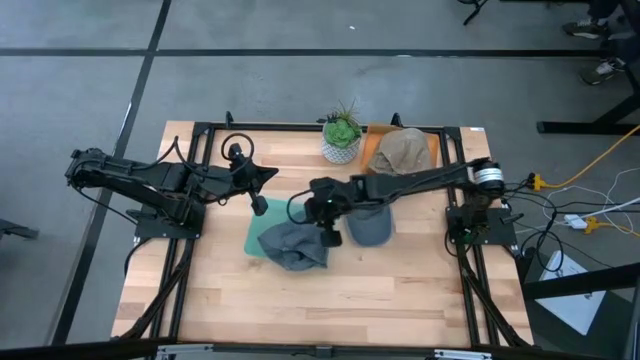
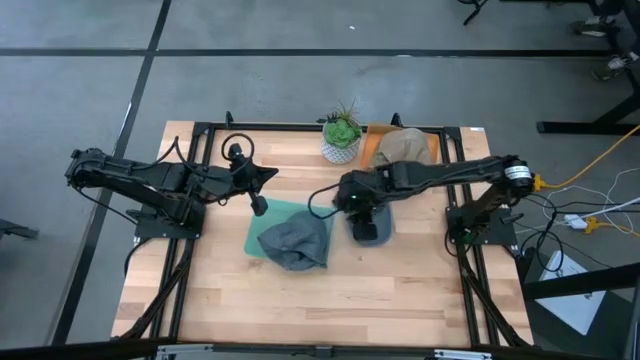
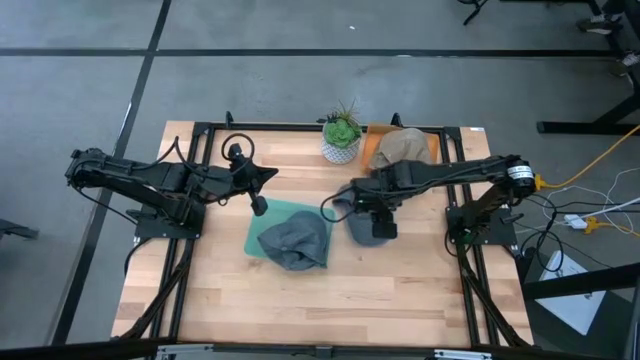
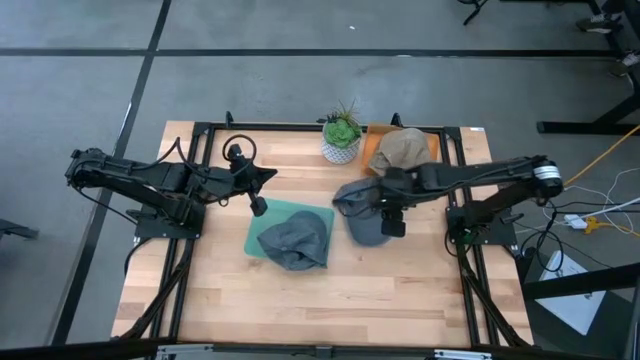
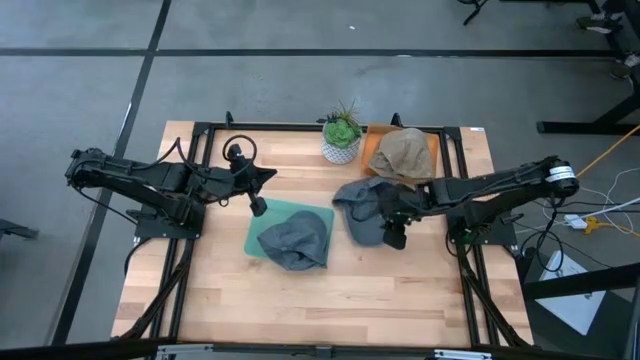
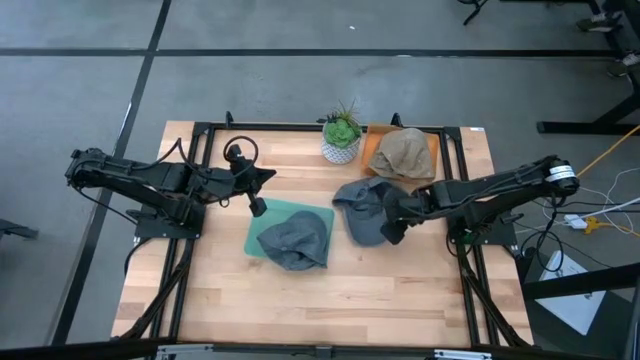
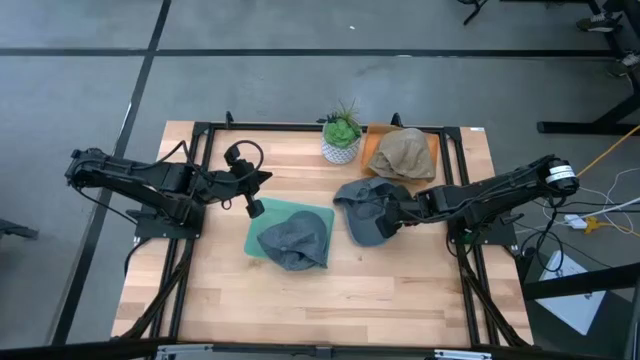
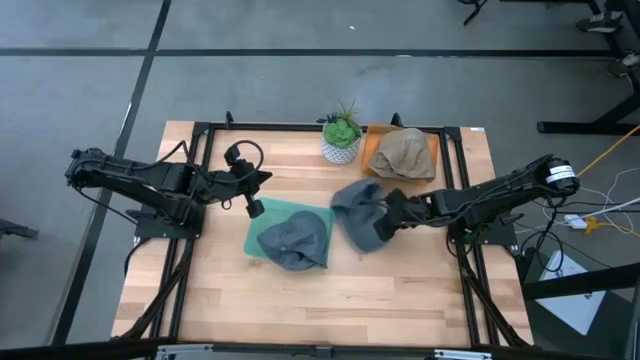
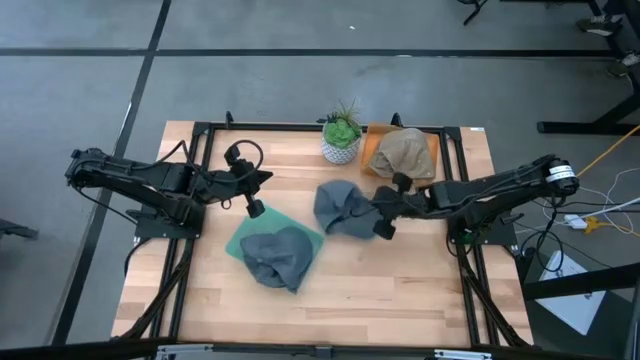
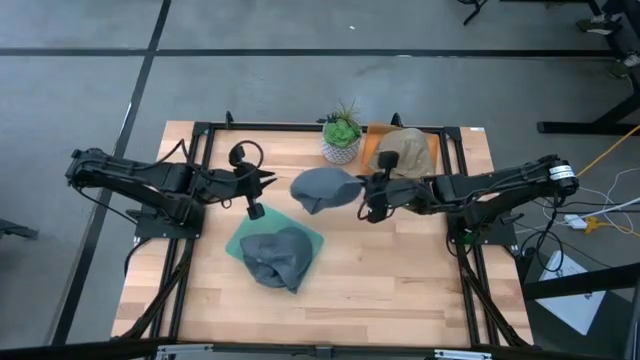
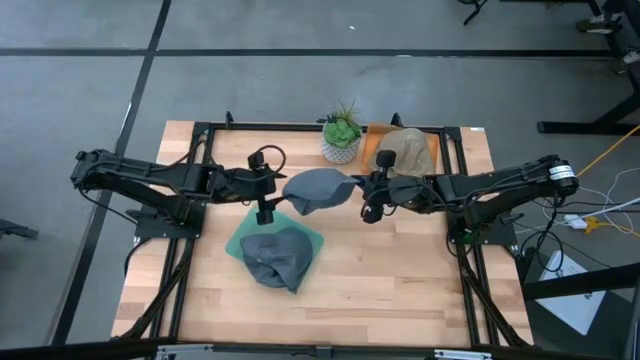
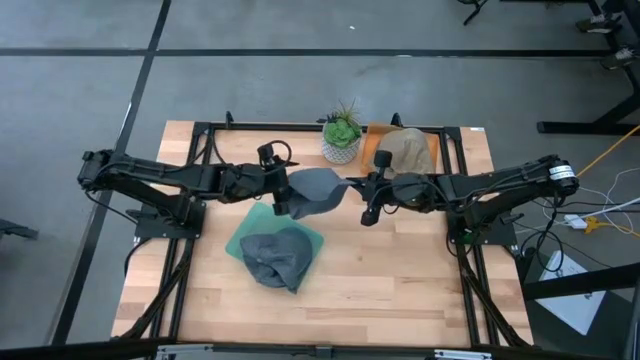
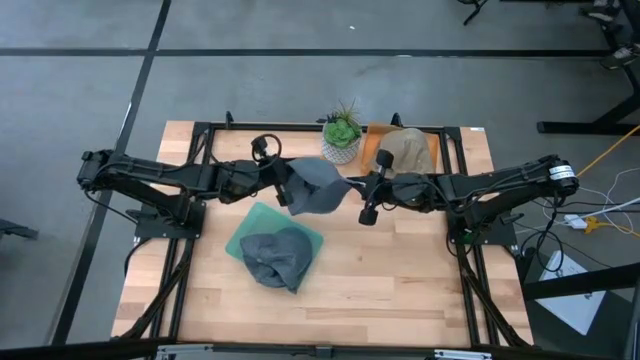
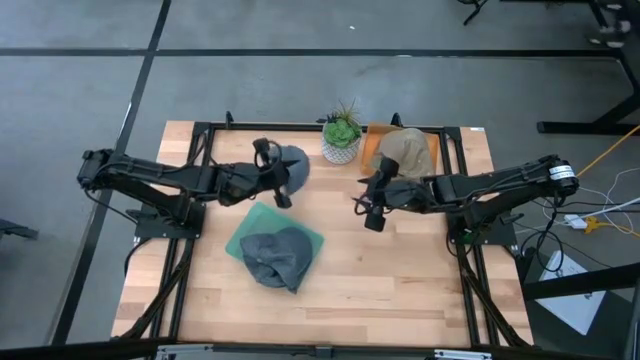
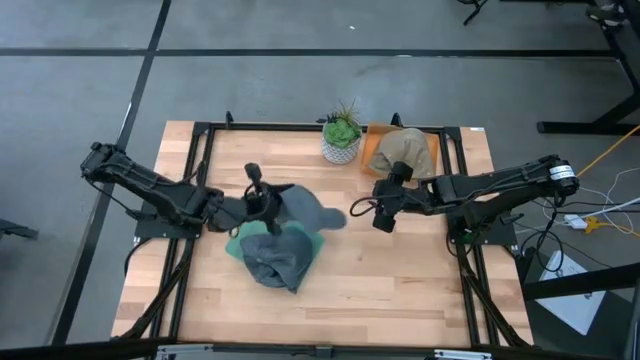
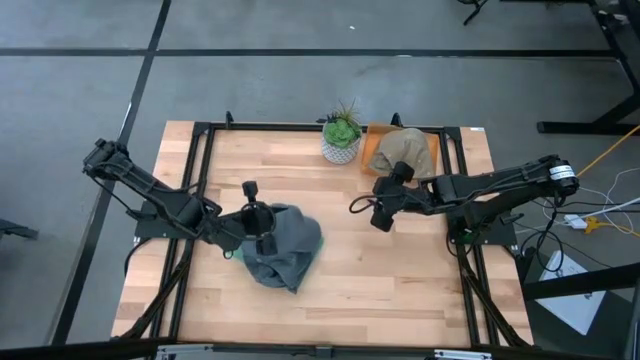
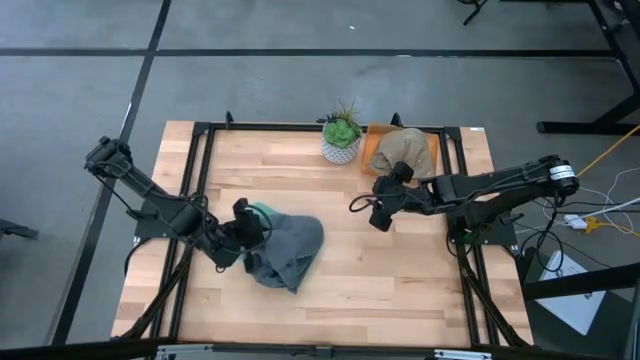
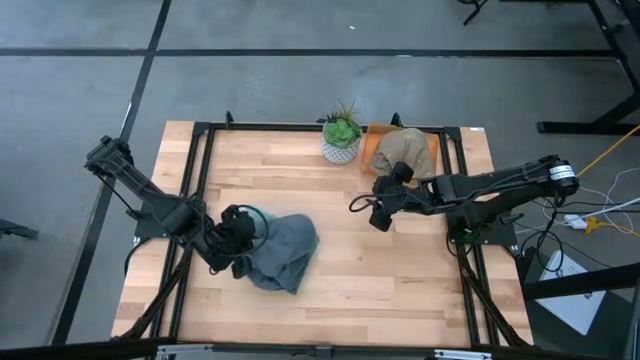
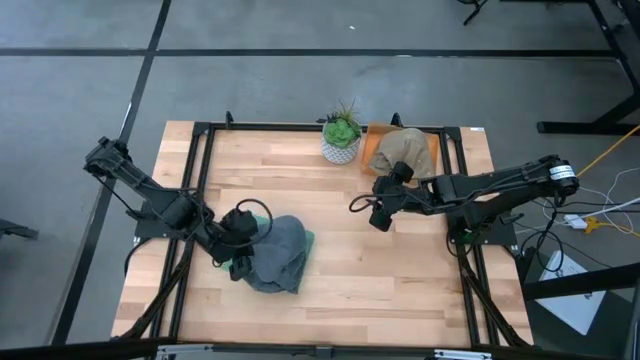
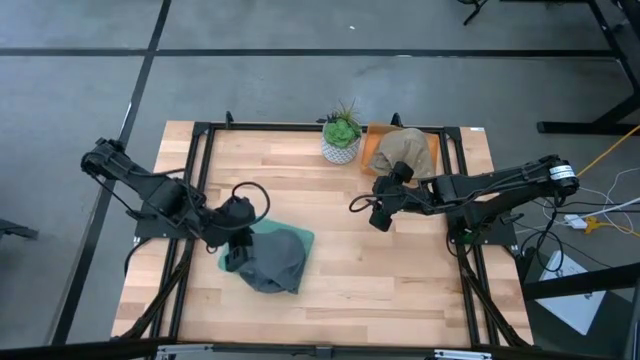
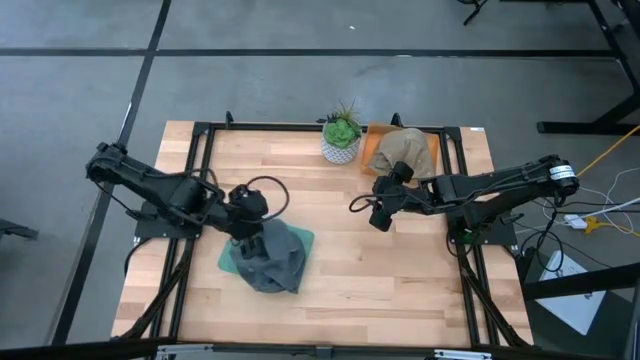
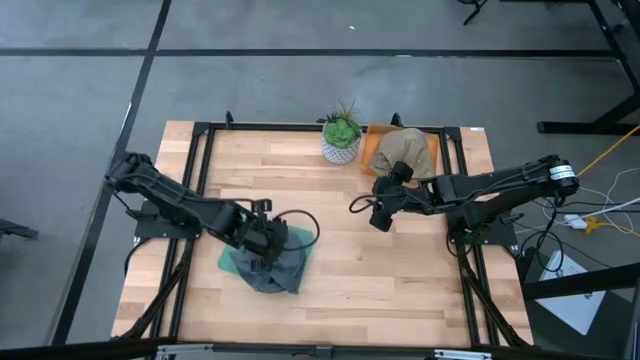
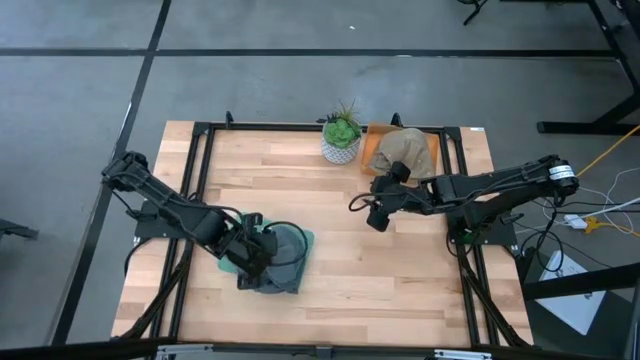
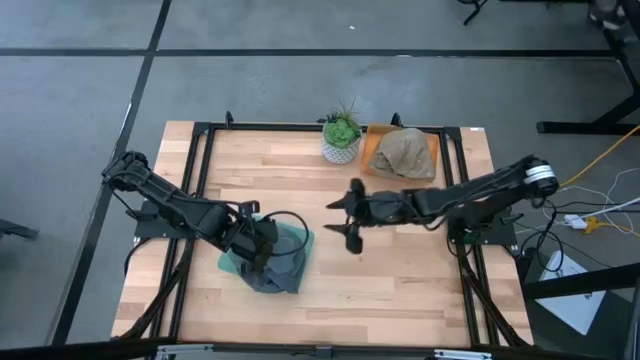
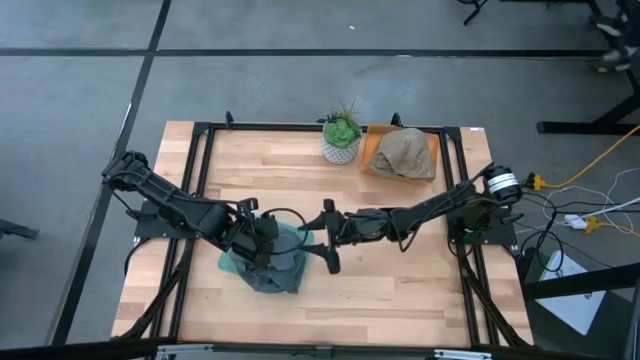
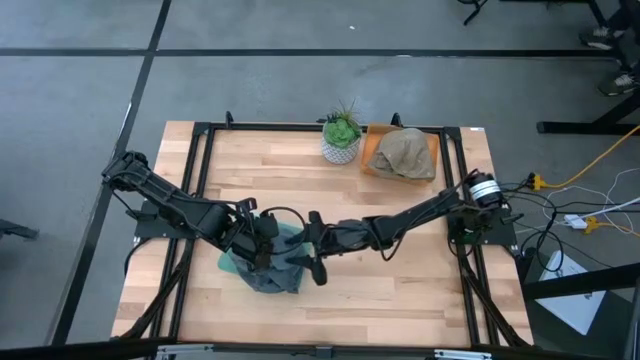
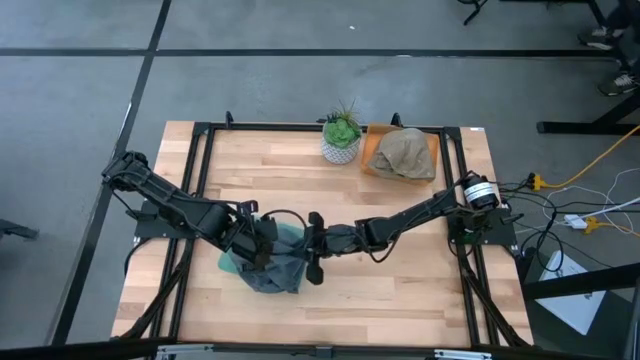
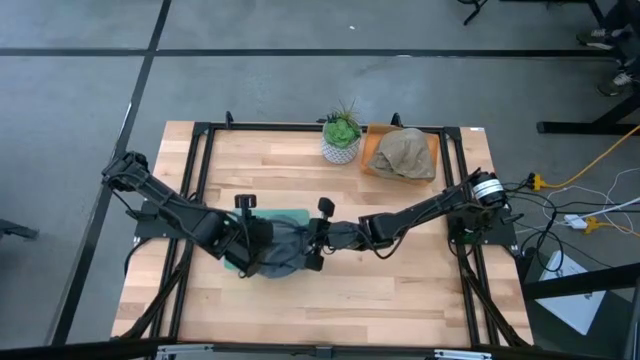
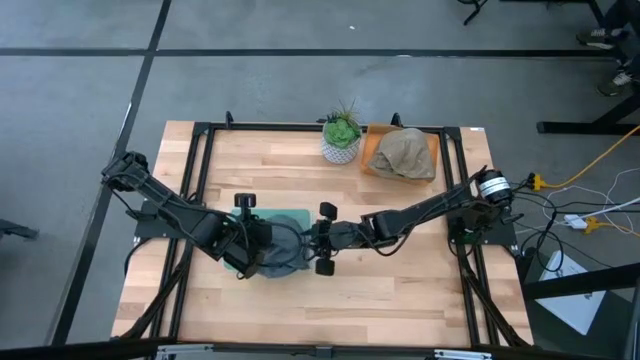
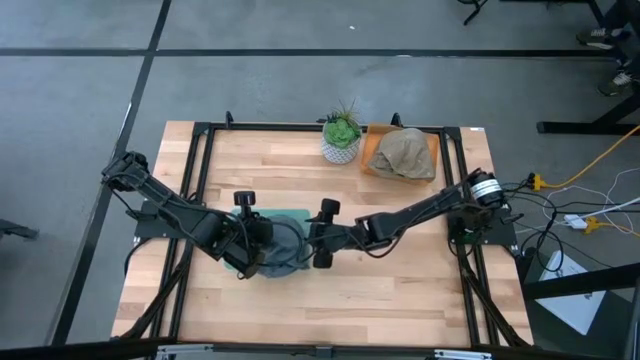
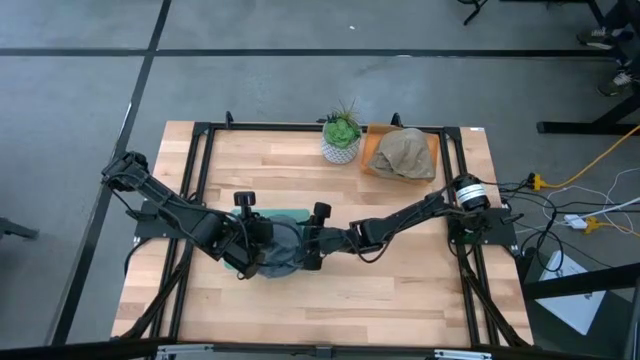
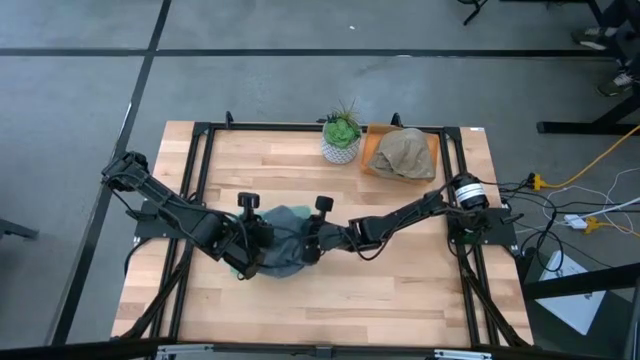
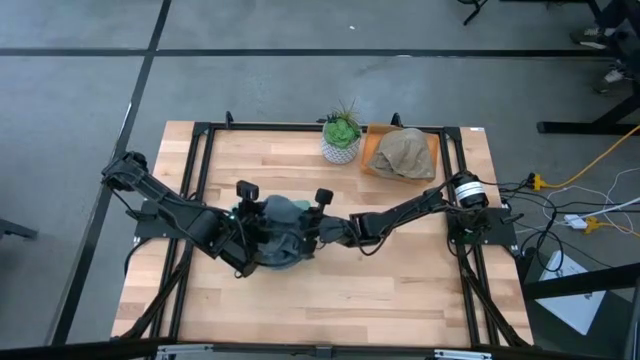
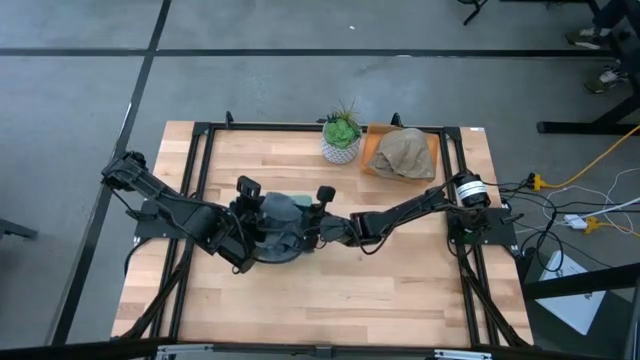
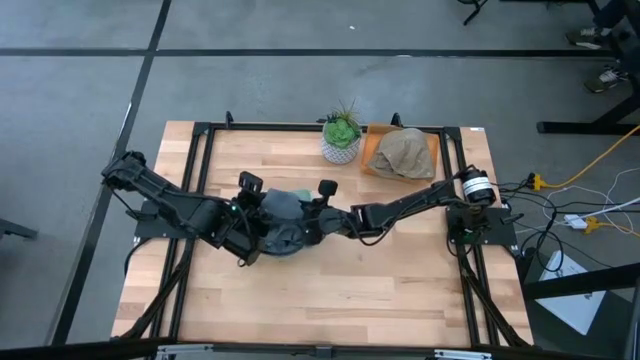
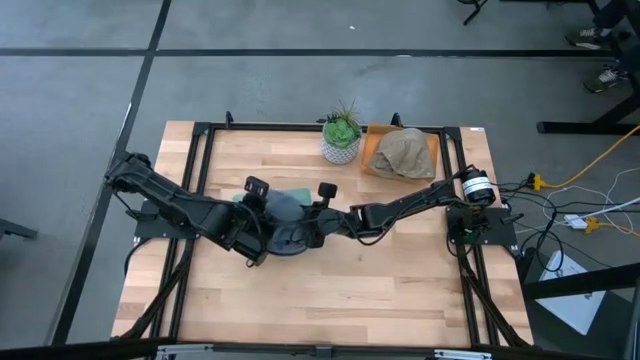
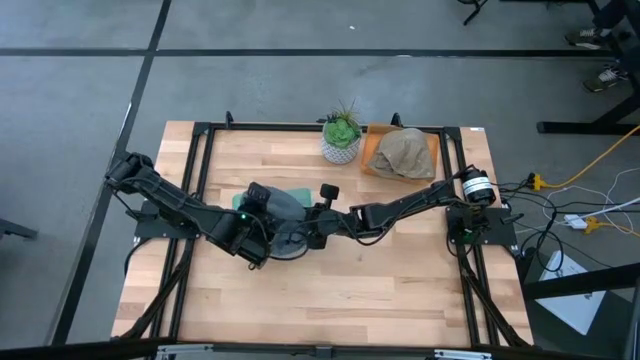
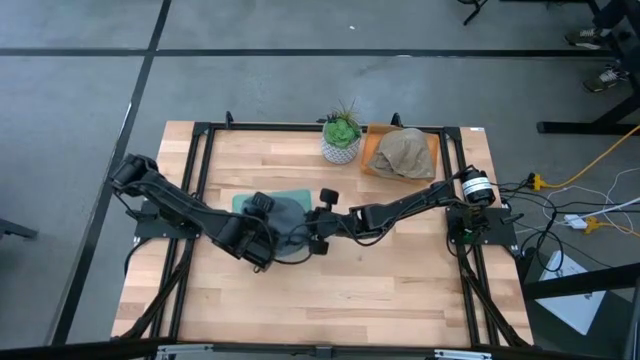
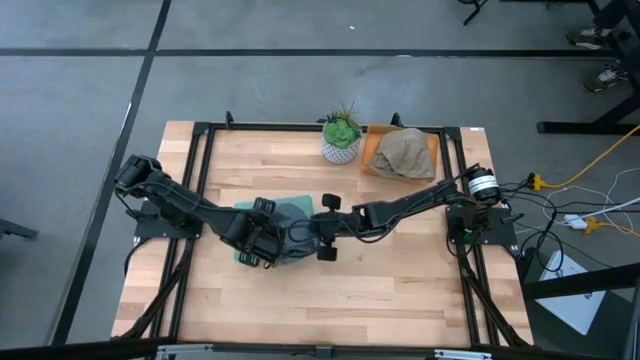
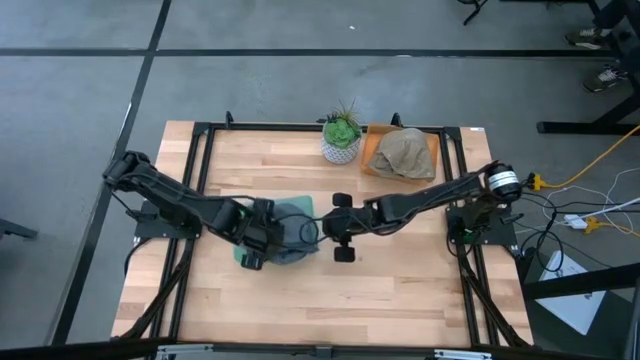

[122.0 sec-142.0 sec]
Task: Pick & Place hat
Put the blue cap into the green bin
